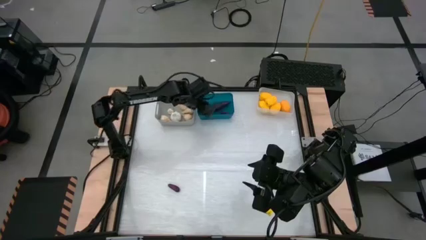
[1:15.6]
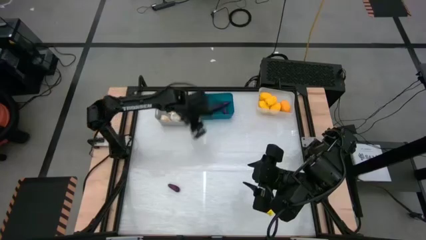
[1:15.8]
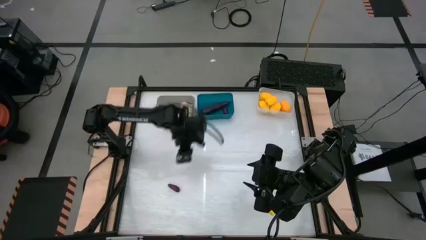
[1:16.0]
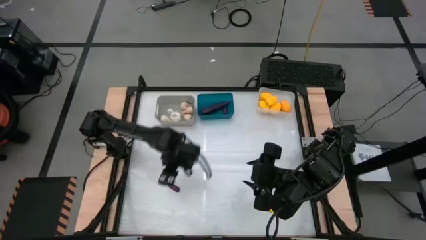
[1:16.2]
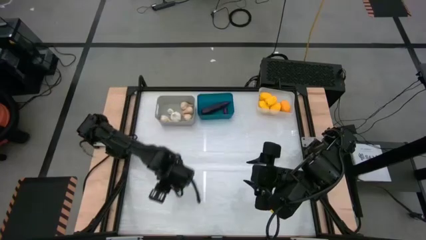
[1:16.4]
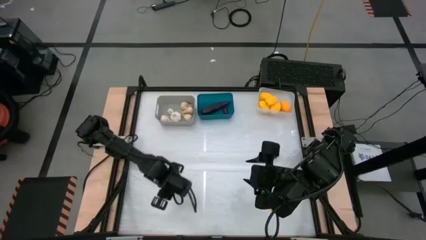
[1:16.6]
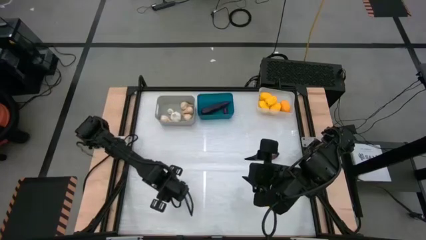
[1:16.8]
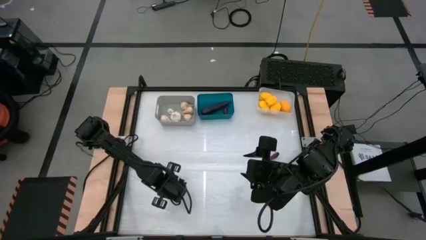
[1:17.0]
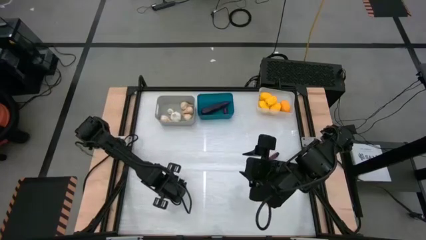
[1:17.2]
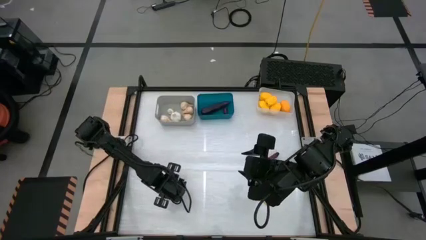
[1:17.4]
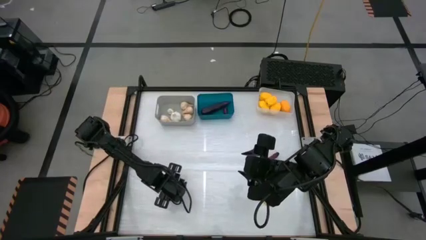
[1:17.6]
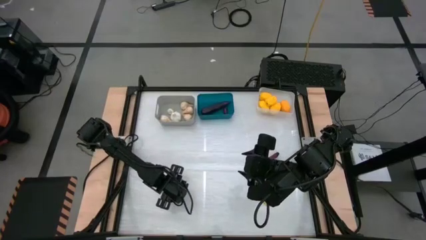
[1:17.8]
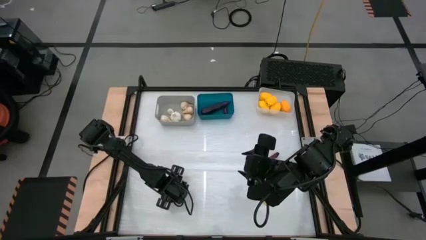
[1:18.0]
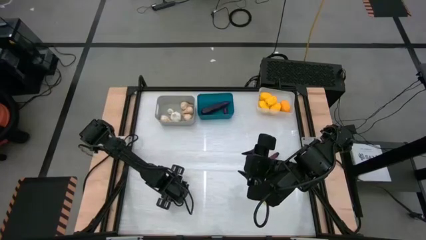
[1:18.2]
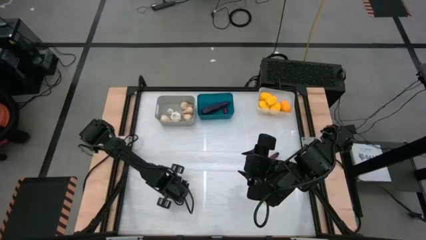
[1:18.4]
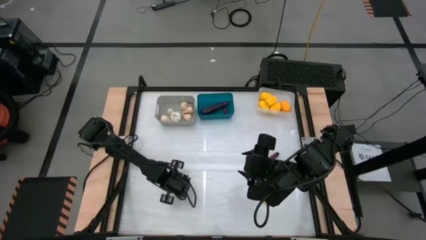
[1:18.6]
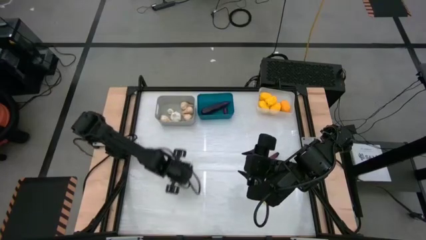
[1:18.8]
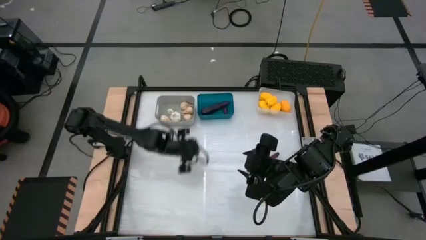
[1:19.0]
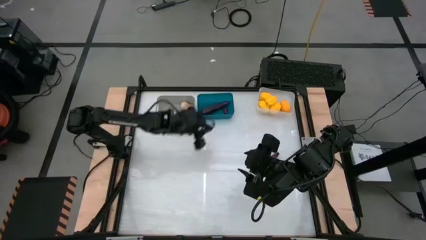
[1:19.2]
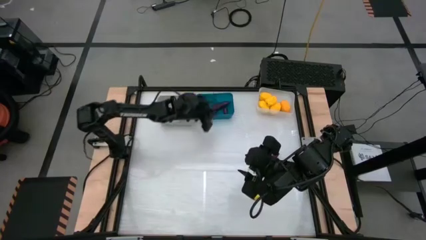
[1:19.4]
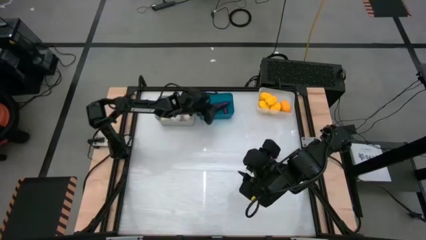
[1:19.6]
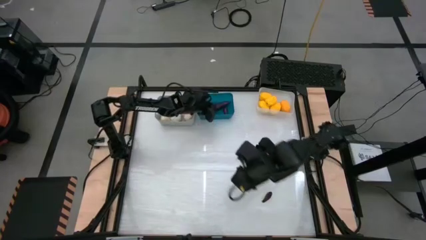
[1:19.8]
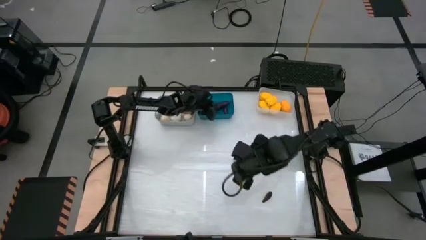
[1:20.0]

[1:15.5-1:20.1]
Task: Sort produce into baskets
Put the eggplant into the blue bin

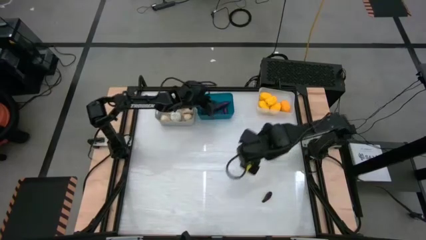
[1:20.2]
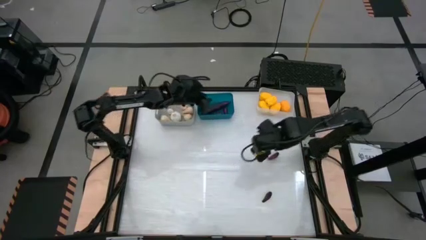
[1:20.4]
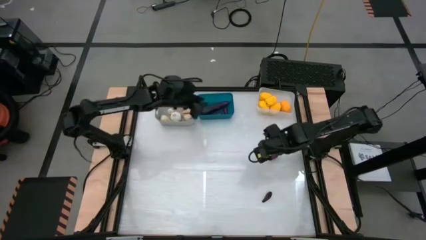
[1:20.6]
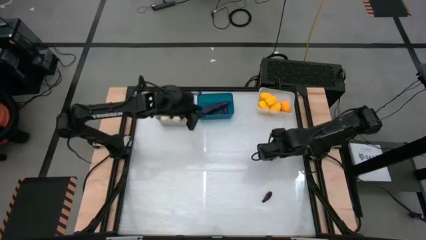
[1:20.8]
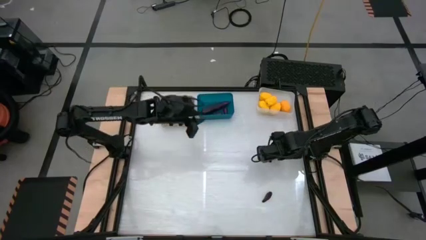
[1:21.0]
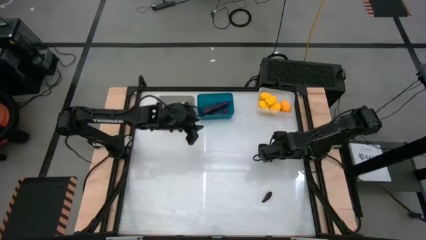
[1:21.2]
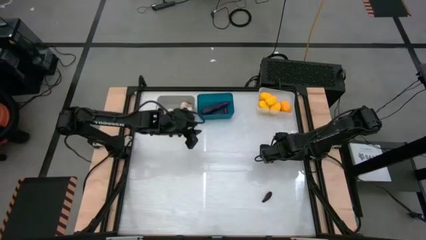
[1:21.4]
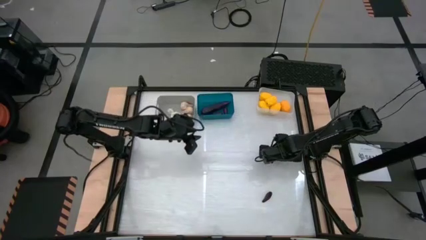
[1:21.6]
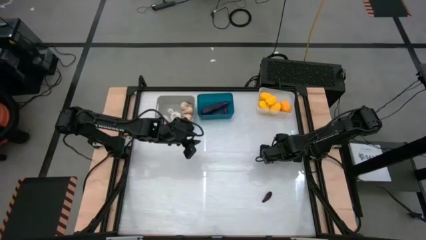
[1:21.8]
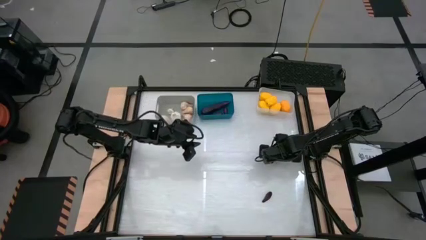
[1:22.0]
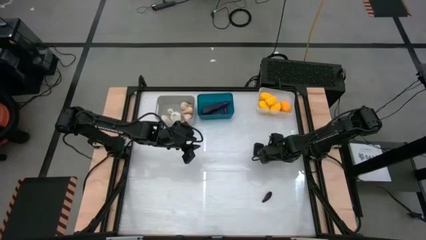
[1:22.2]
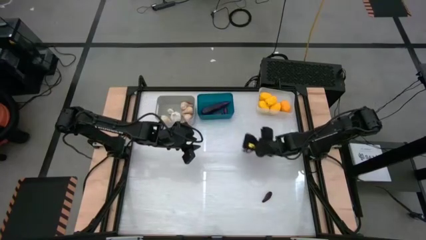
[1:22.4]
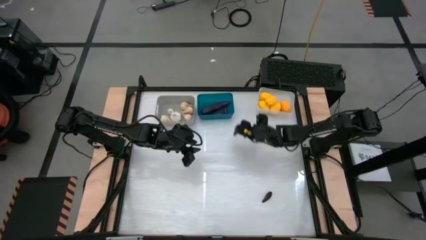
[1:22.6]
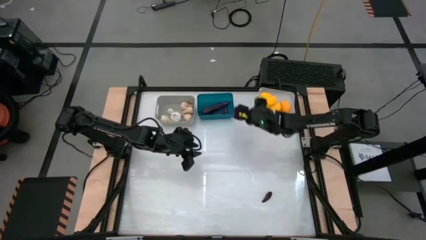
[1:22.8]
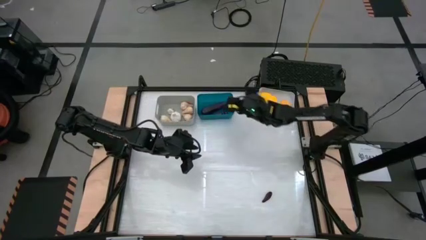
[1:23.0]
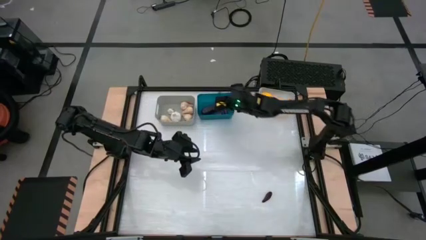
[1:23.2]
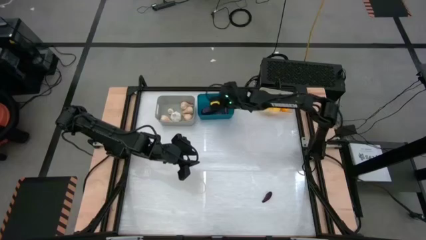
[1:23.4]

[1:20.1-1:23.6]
Put the eggplant into the blue bin

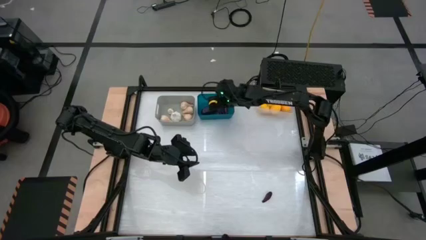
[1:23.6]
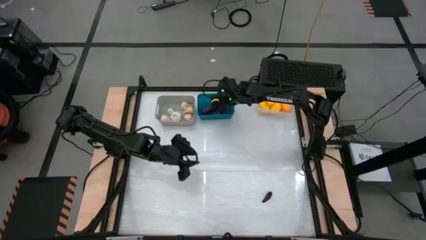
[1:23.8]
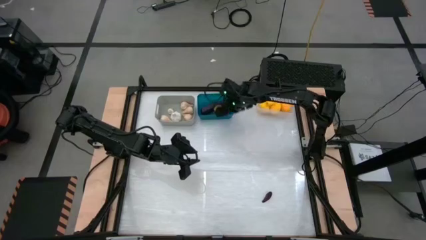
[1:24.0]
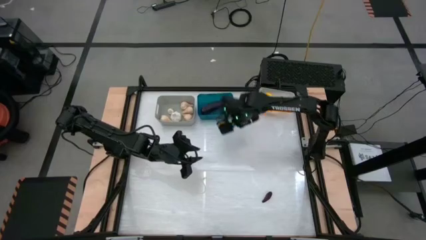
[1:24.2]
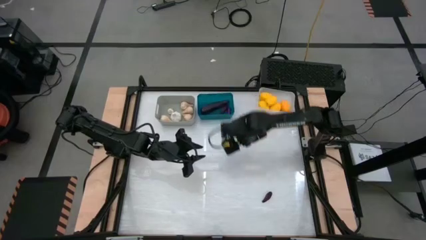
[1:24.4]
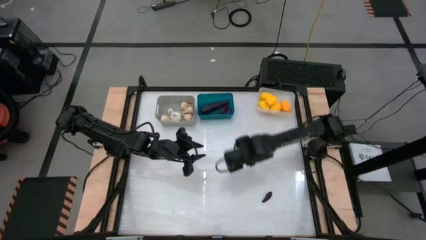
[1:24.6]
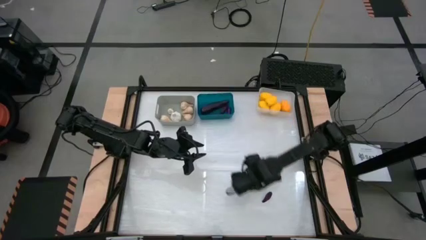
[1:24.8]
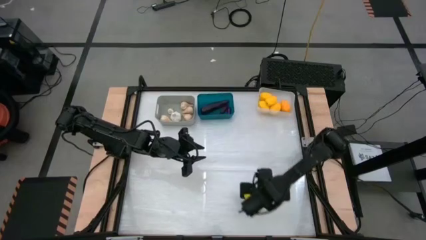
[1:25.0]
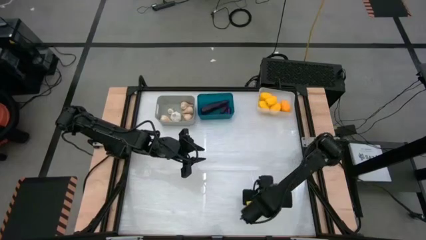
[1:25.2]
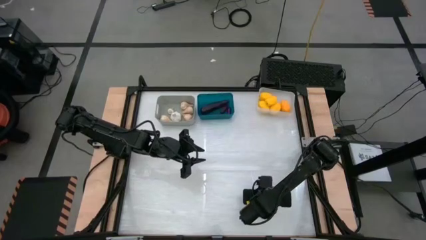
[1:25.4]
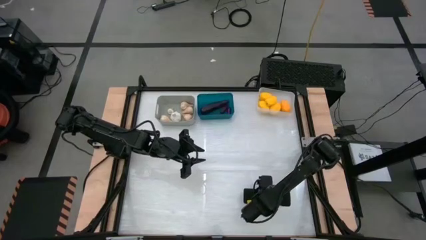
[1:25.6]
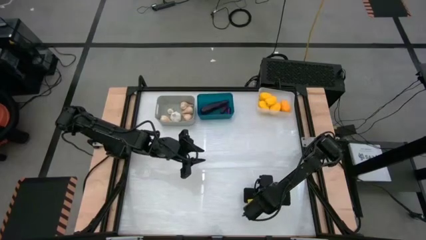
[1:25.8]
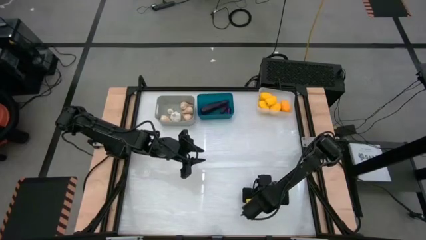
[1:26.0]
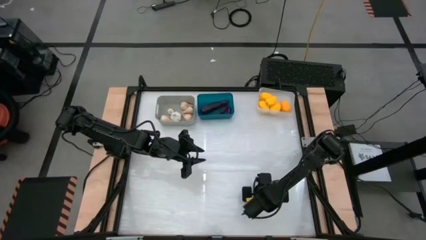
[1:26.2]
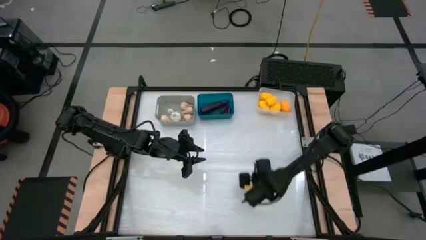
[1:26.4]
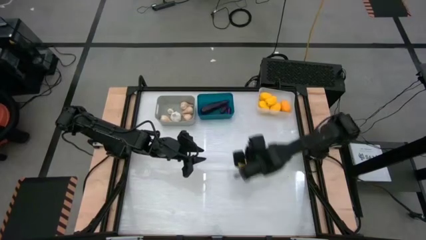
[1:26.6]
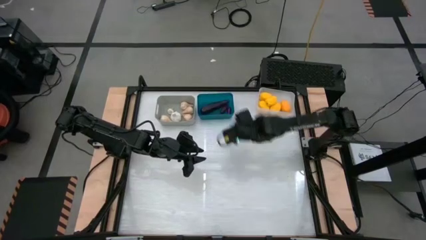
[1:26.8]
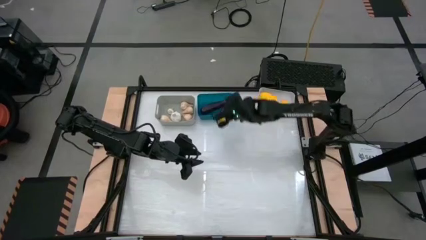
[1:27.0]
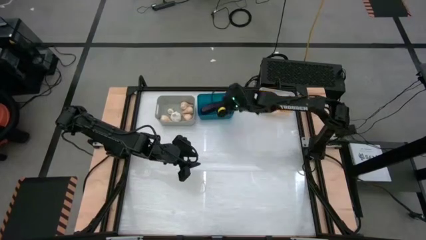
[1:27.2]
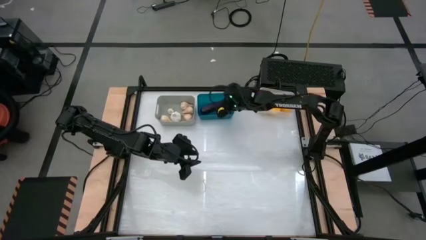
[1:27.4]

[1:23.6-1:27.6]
Put the eggplant into the blue bin

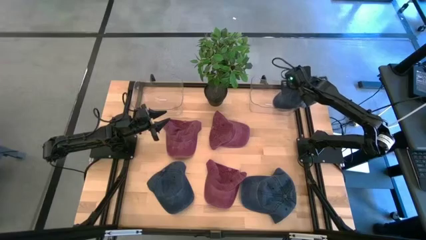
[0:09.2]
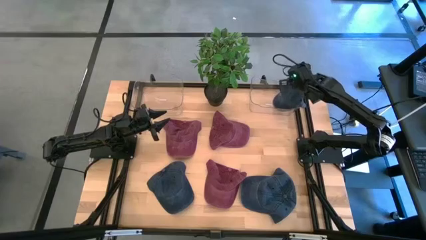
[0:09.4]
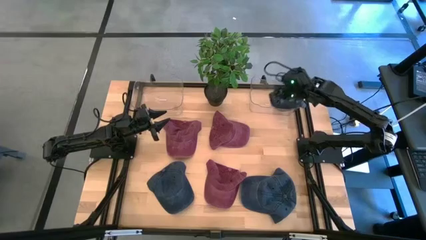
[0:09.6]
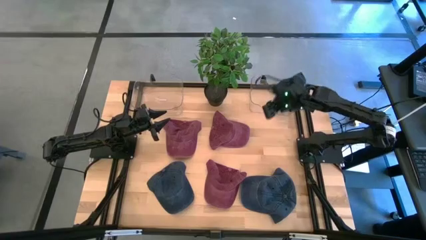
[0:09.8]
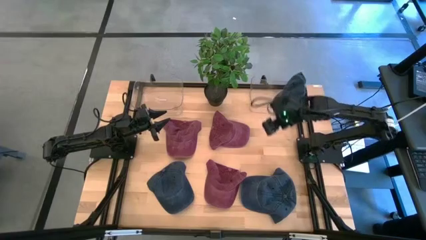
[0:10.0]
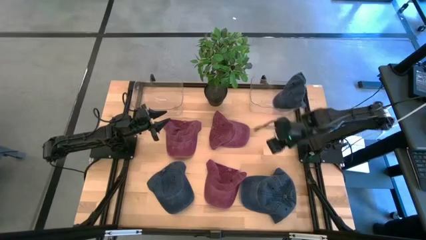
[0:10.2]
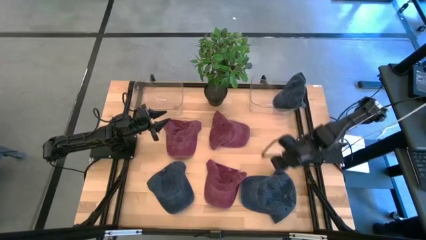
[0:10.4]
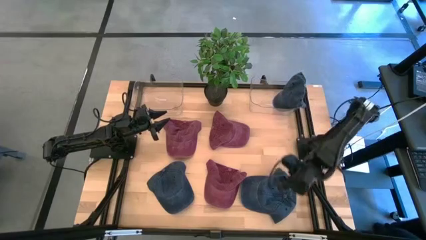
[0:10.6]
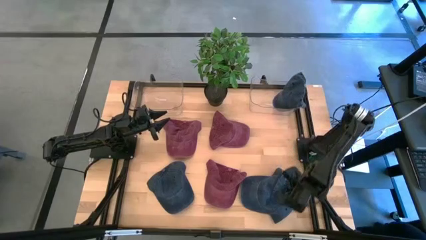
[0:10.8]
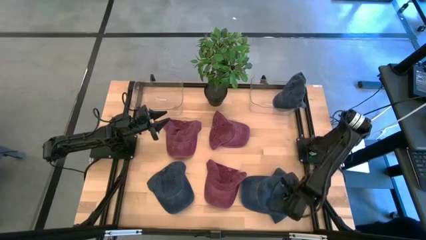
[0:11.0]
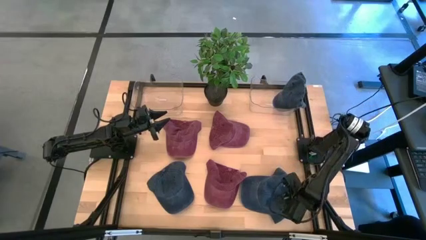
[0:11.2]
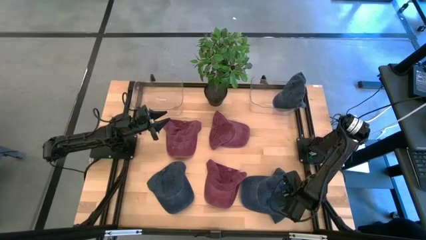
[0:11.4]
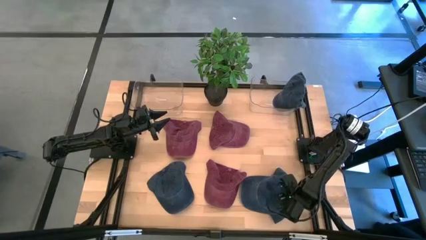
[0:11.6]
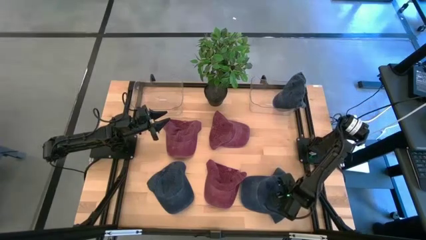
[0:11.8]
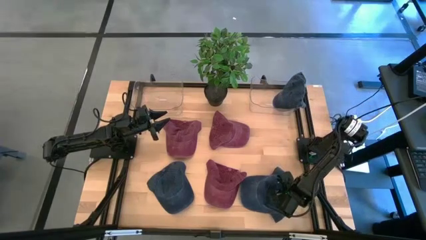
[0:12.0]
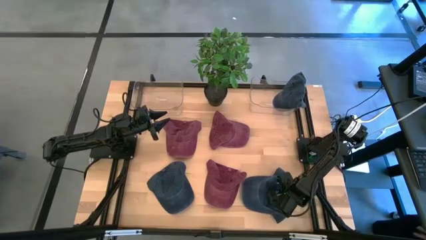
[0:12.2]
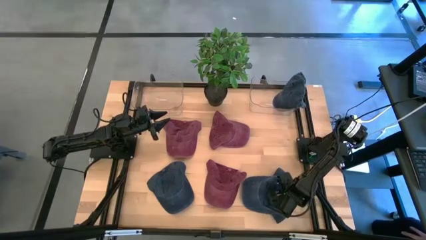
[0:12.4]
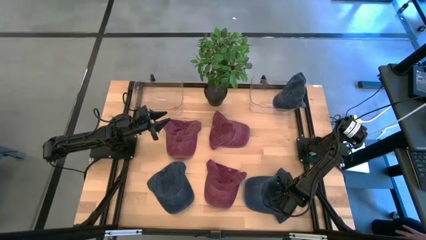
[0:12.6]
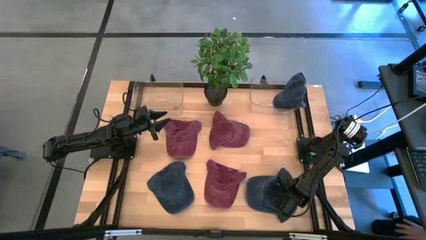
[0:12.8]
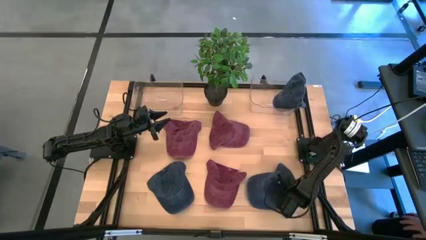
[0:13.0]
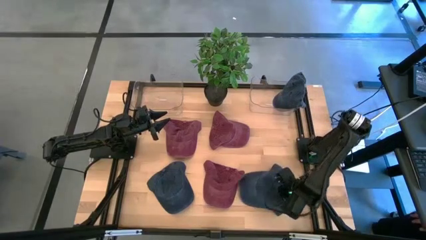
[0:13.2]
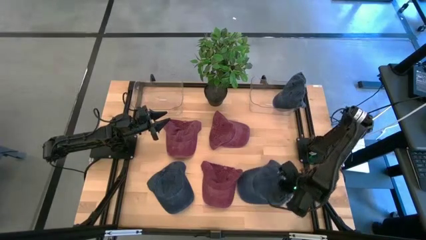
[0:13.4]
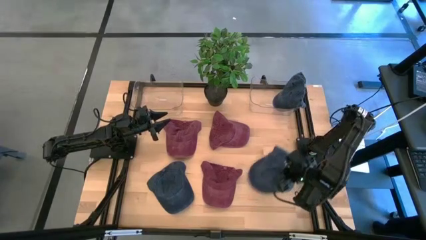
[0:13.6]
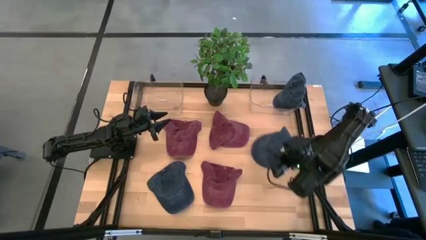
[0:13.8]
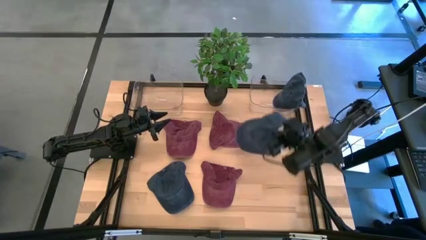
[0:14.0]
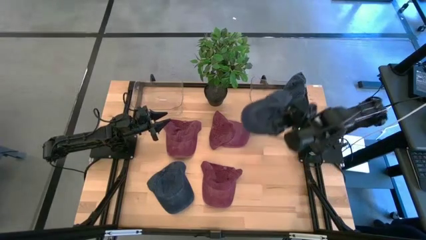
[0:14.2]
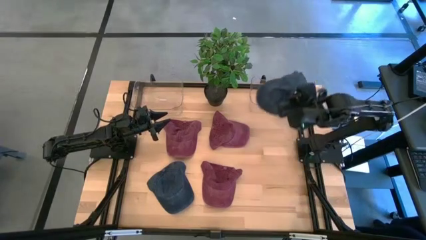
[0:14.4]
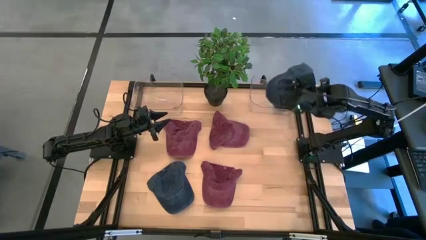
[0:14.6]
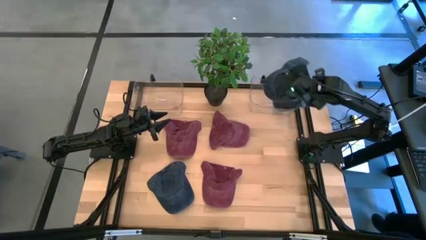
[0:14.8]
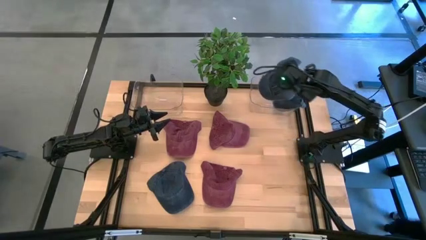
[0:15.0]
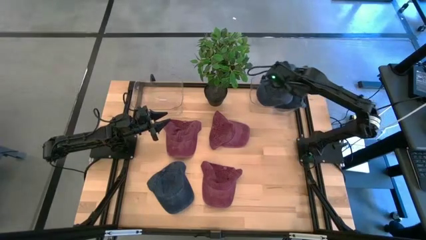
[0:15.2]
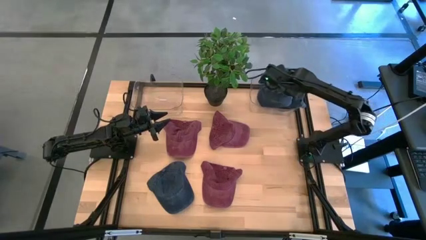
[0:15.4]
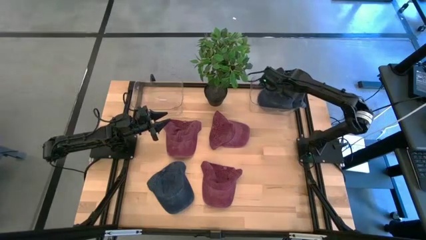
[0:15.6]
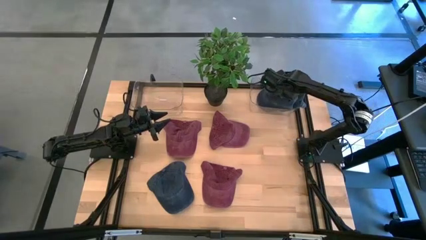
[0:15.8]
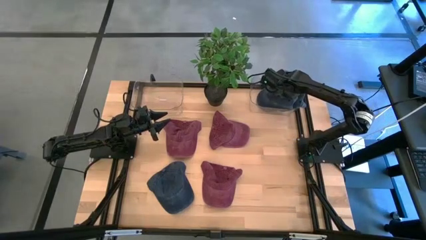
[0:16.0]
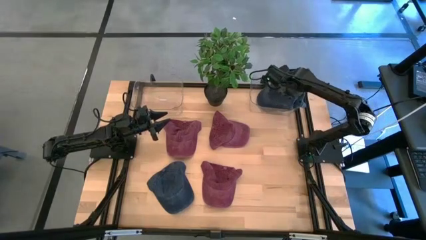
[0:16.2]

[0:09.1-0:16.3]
Task: Pick & Place hat
Put the right black cap into the right transparent bin
